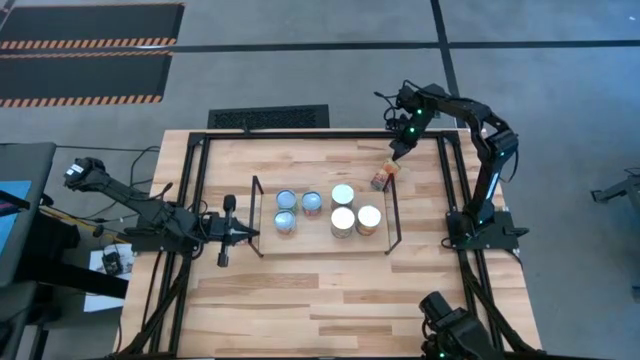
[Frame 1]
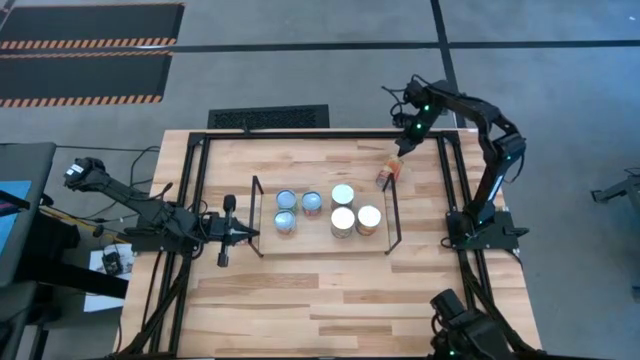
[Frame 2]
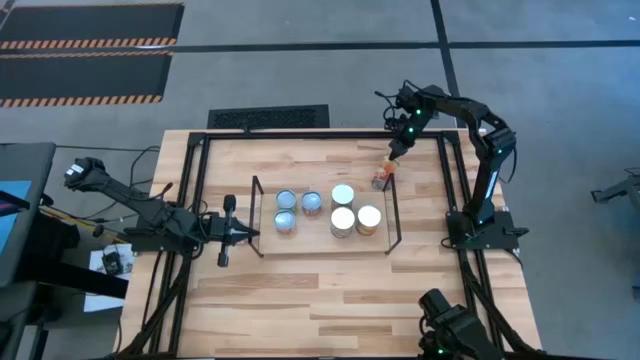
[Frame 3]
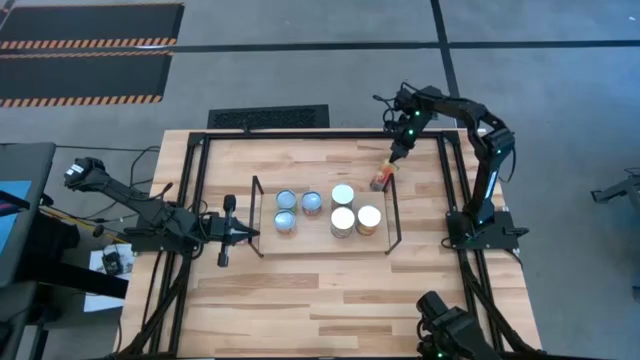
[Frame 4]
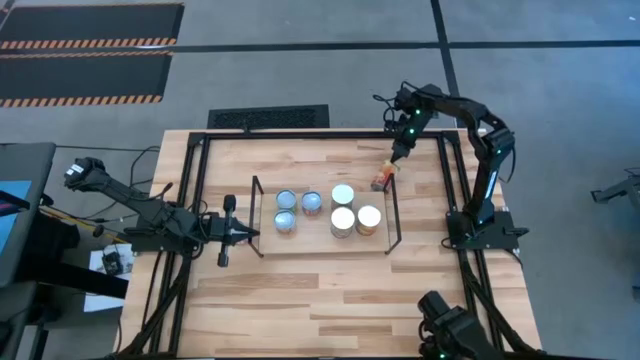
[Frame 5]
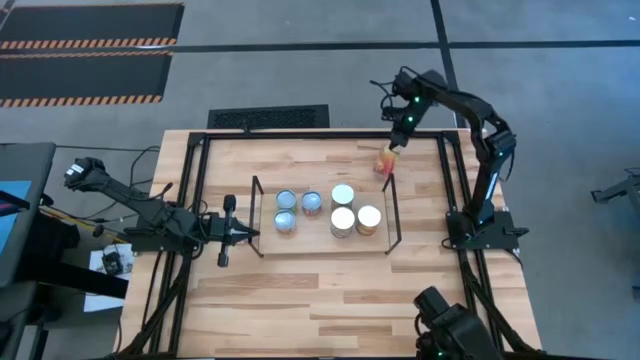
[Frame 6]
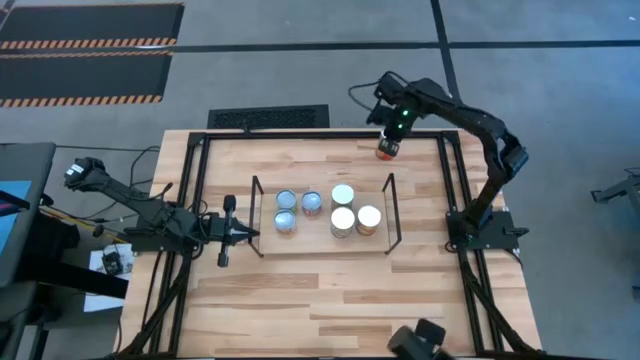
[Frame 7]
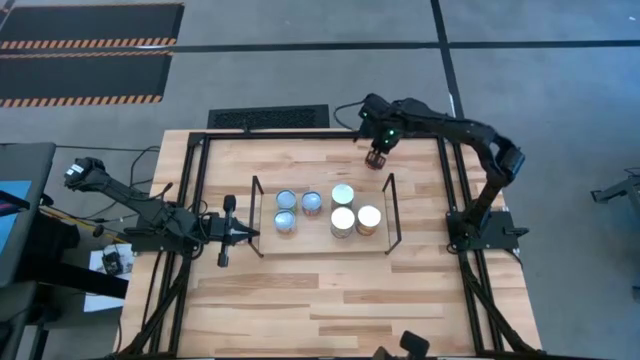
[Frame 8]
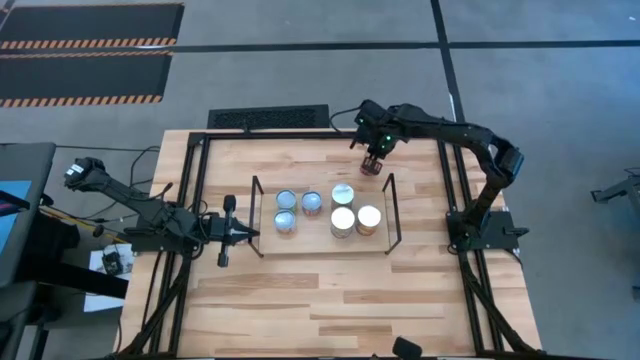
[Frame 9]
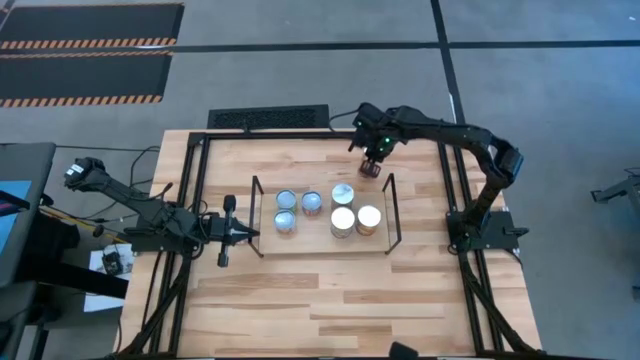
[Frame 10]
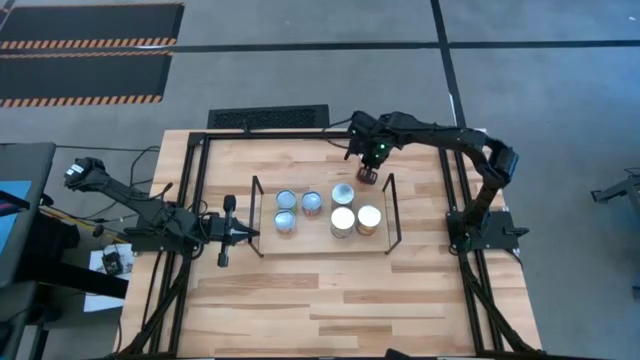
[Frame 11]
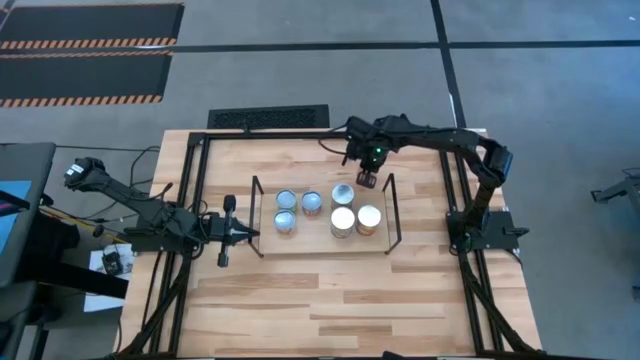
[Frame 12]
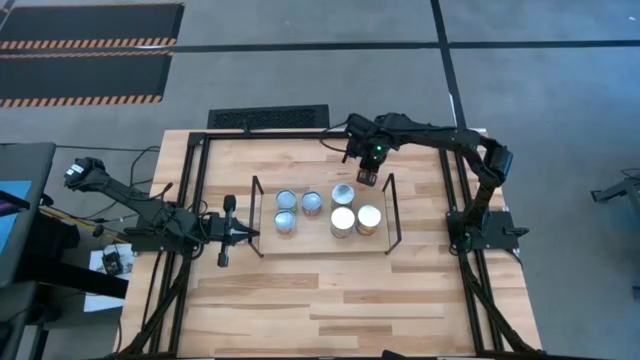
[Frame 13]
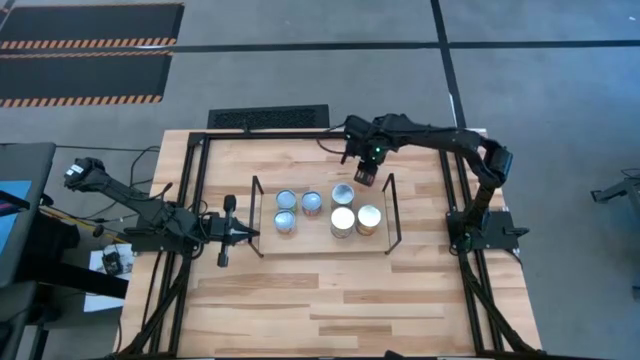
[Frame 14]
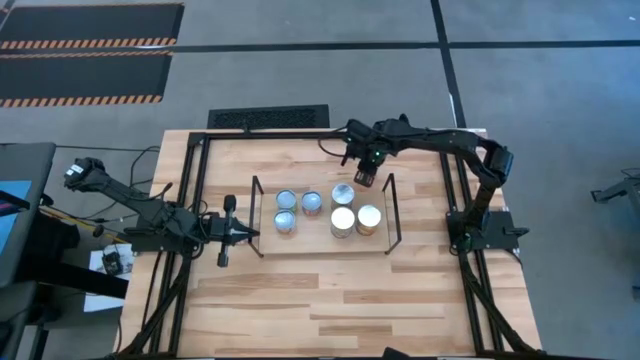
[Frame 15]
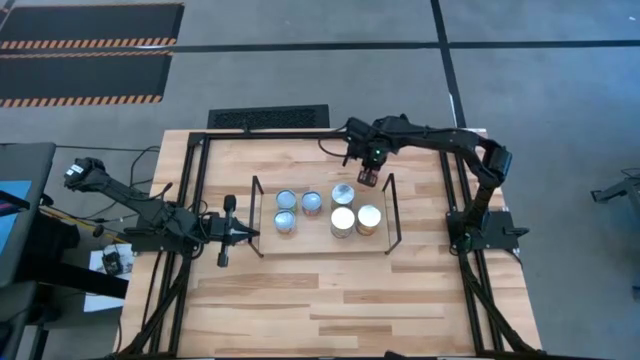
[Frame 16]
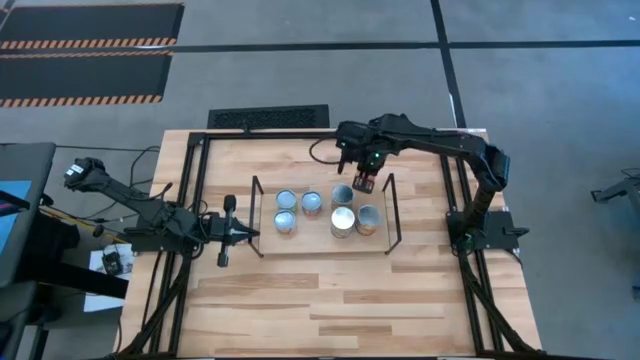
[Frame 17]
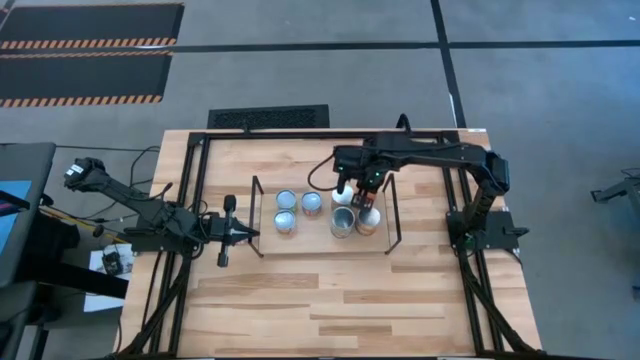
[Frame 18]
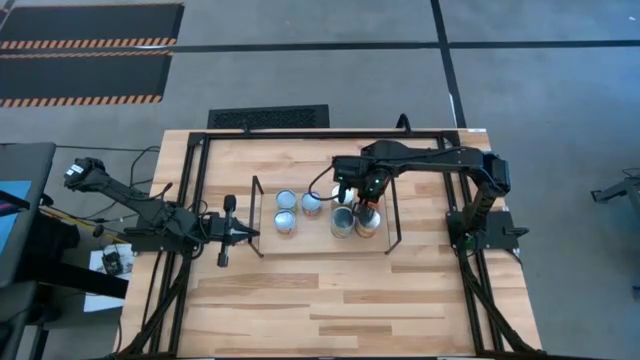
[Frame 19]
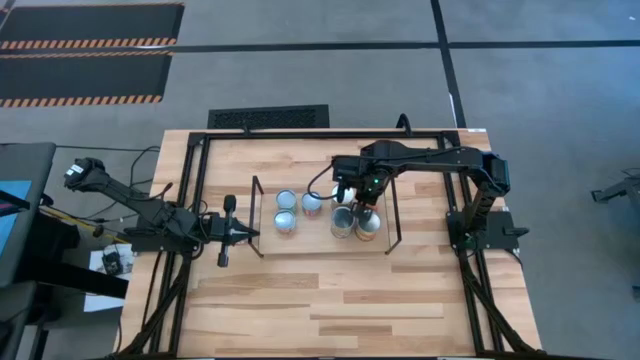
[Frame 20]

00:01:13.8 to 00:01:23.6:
Task: Pick and place cans onto a shelf
Put the large canned corn on the shelf aligned with the other canned corn

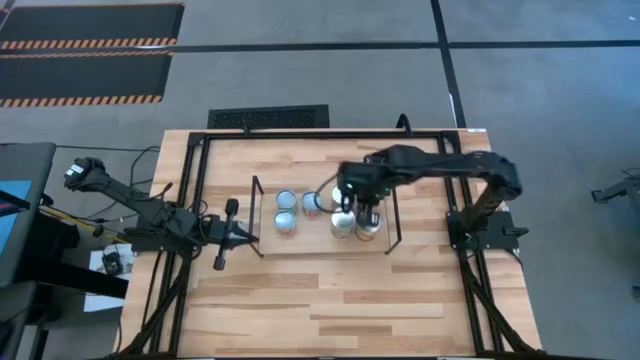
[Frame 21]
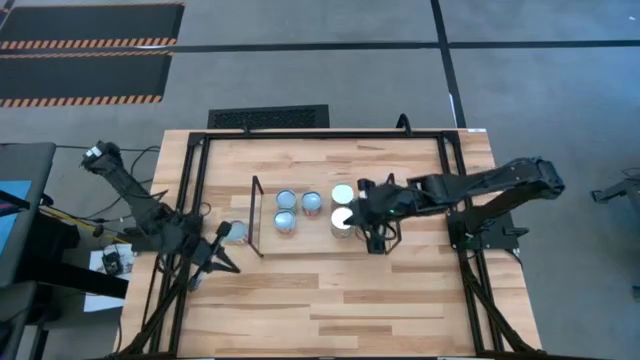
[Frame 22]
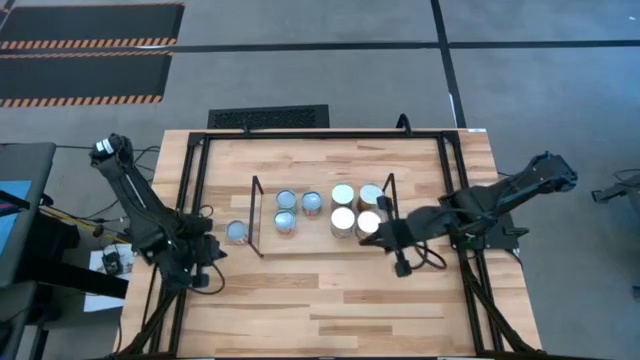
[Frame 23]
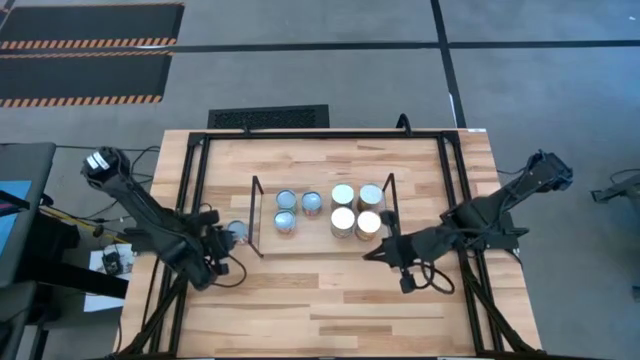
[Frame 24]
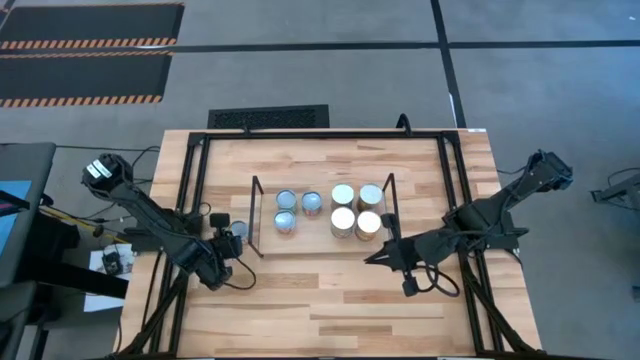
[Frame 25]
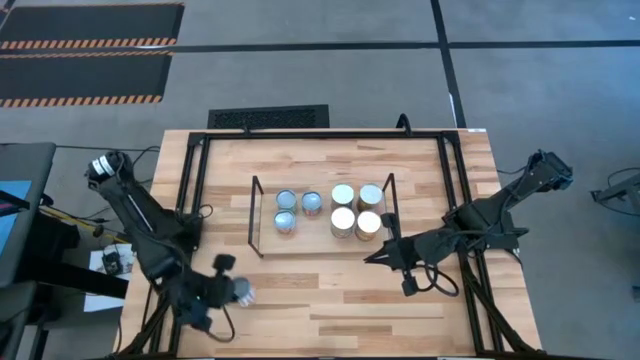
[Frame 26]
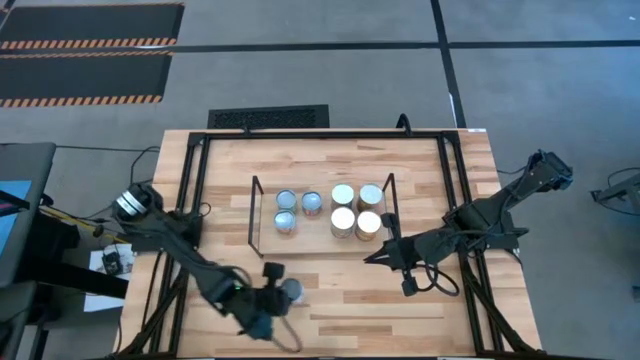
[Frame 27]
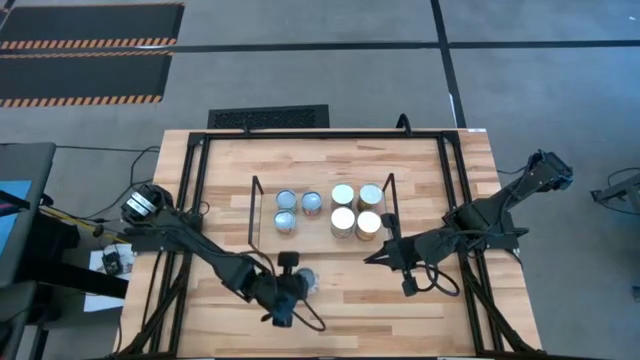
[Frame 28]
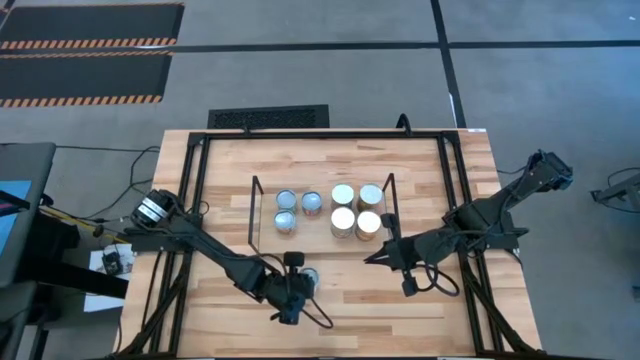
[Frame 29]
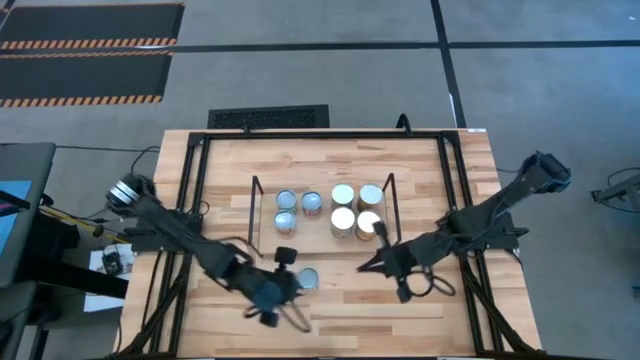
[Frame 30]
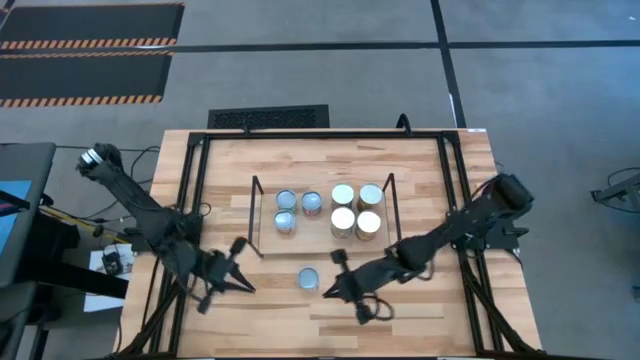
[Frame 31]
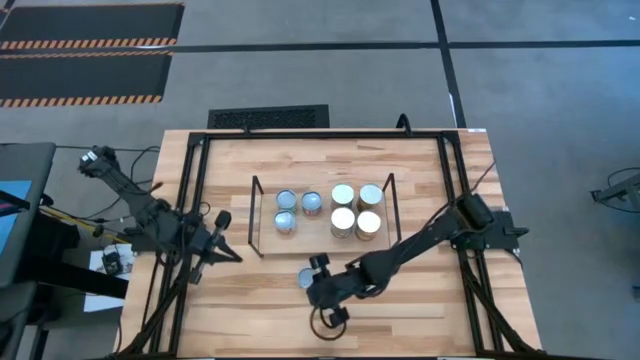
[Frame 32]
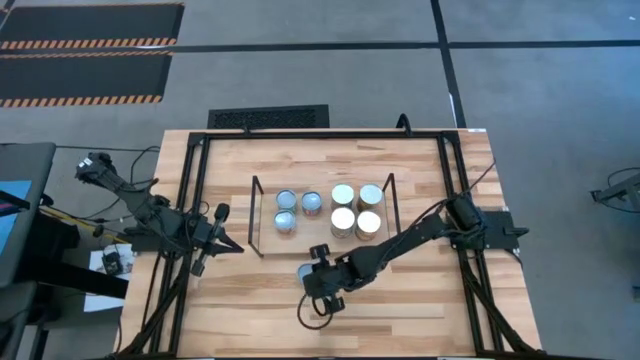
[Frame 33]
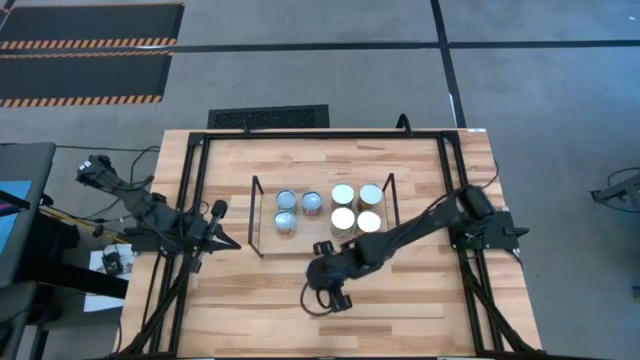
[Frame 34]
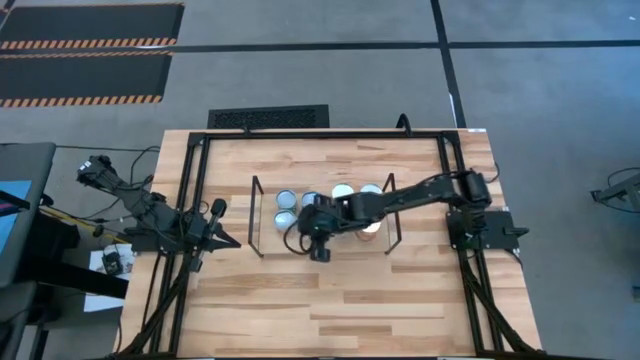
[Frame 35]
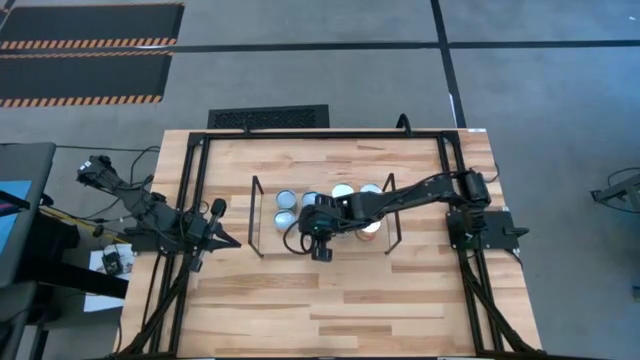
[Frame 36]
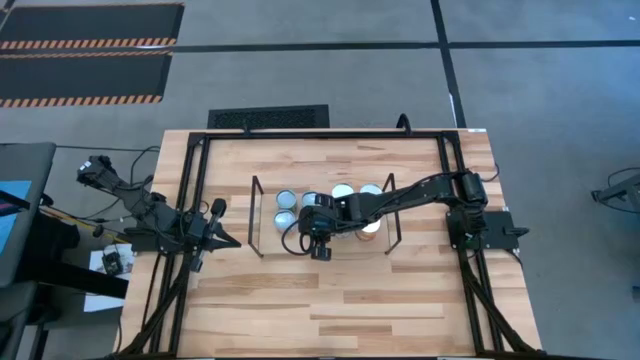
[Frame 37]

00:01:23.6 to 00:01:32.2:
Put the canned carrots on the shelf

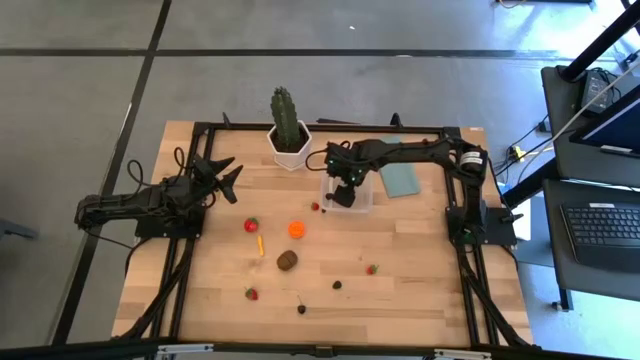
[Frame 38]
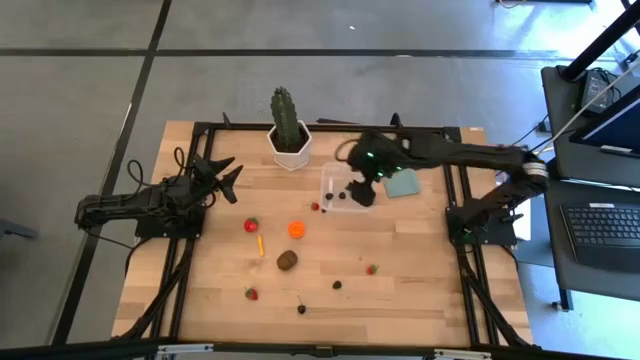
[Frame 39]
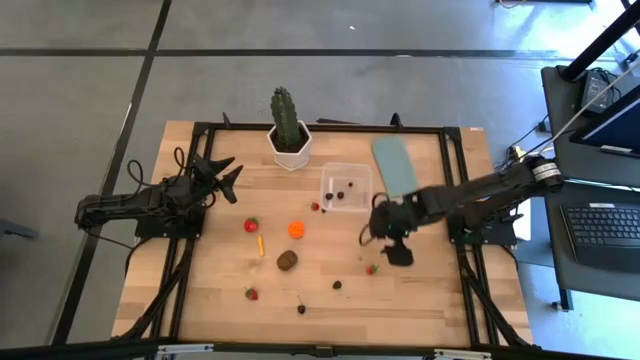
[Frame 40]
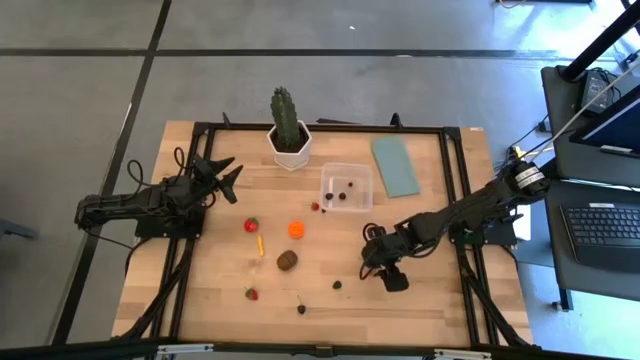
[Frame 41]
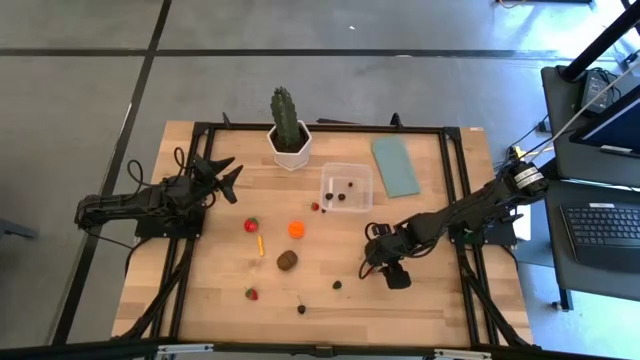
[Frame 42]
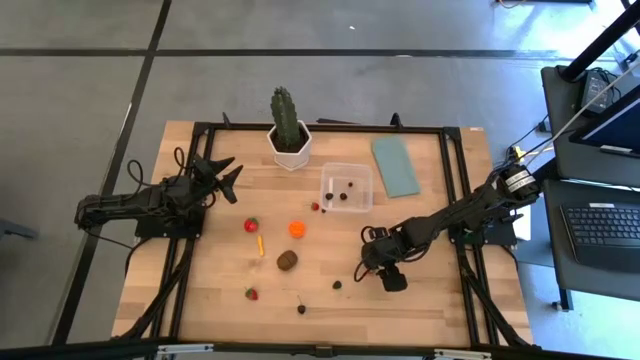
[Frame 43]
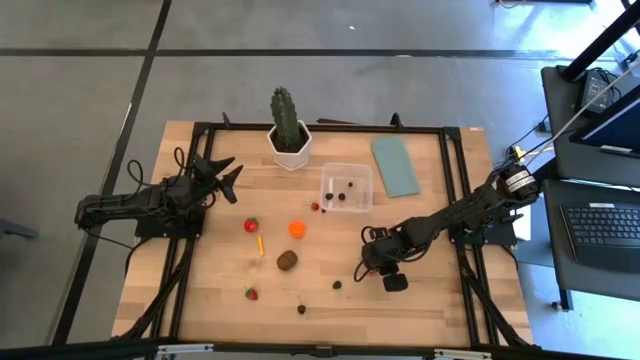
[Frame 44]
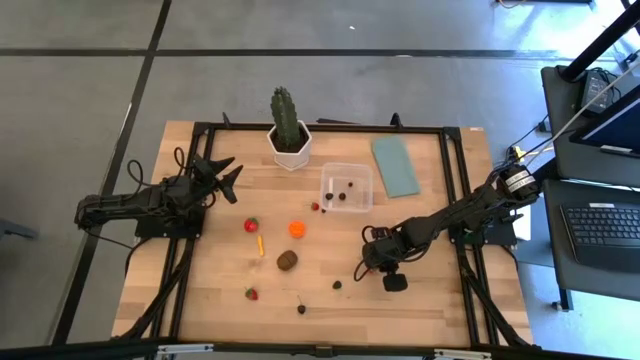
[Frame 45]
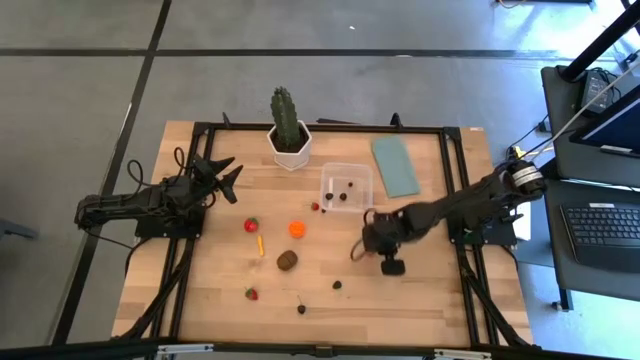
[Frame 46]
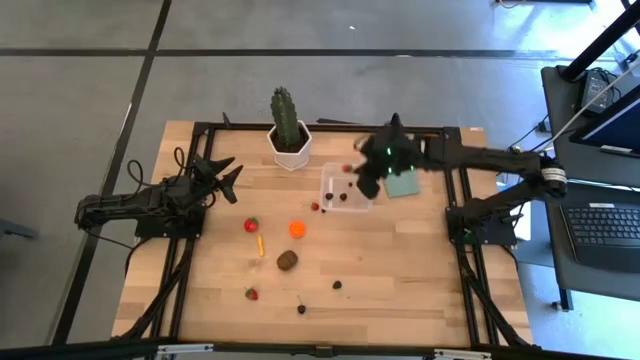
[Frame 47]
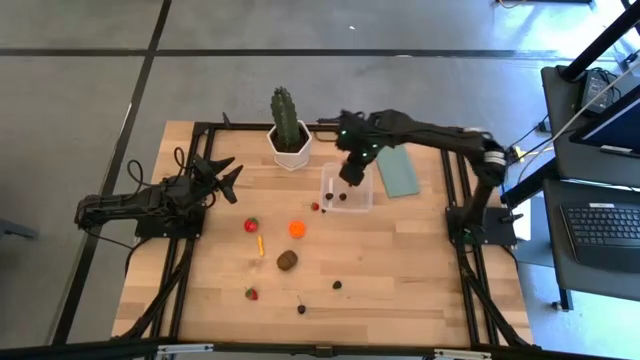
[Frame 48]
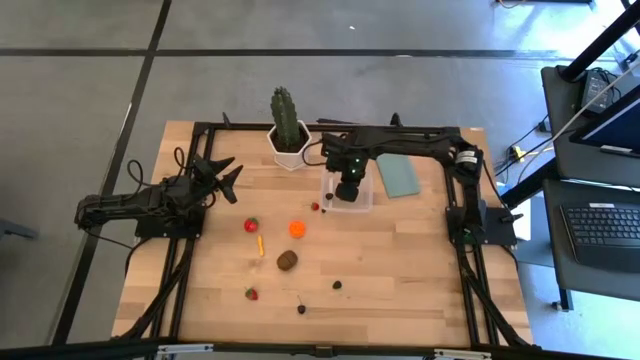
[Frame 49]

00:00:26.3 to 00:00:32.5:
Task: Pick and placing Produce into tupperware
Put the right strawberry into the transparent bin
